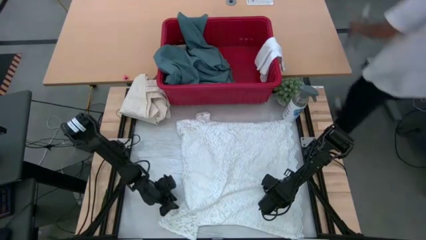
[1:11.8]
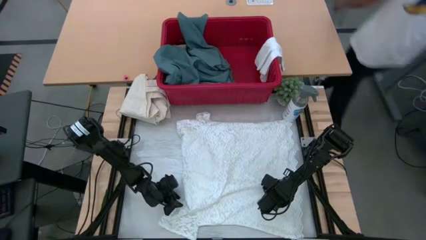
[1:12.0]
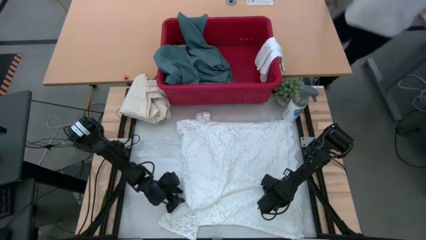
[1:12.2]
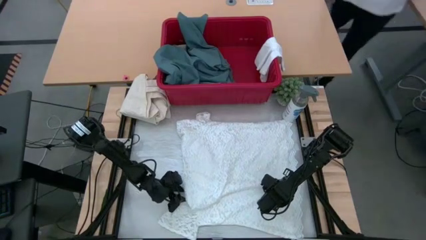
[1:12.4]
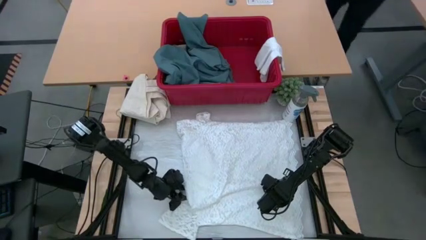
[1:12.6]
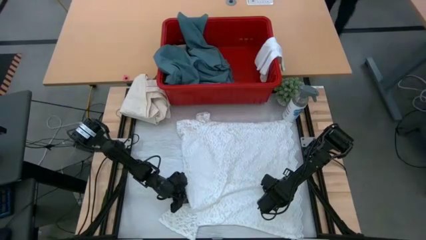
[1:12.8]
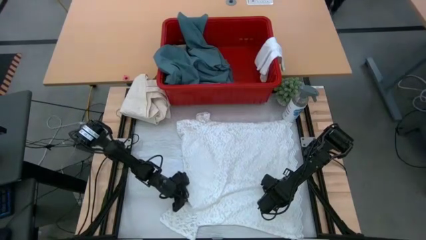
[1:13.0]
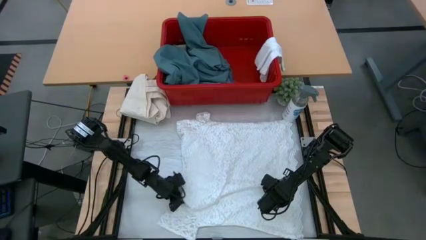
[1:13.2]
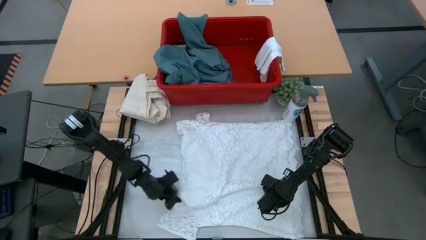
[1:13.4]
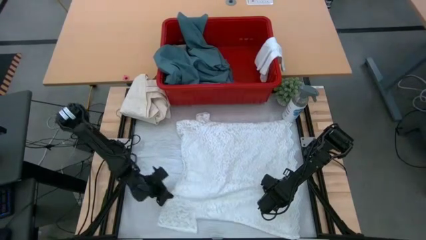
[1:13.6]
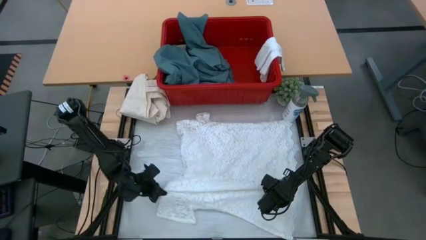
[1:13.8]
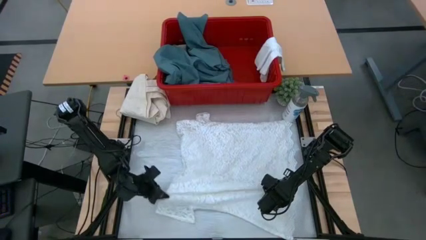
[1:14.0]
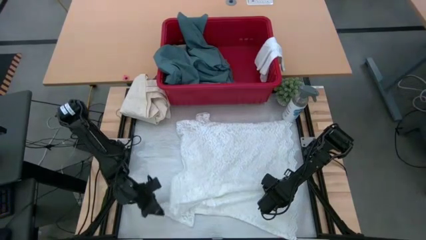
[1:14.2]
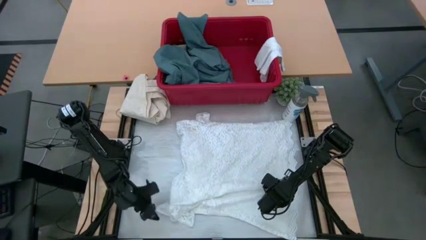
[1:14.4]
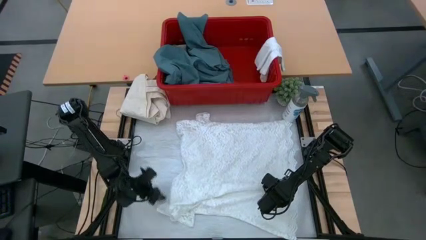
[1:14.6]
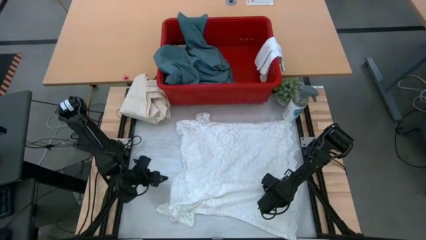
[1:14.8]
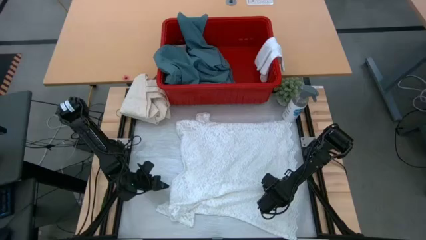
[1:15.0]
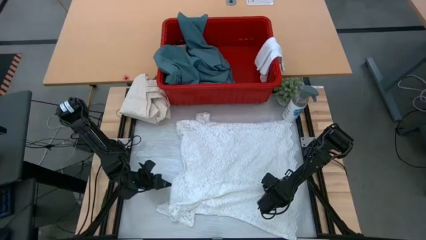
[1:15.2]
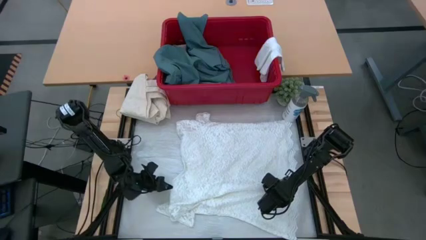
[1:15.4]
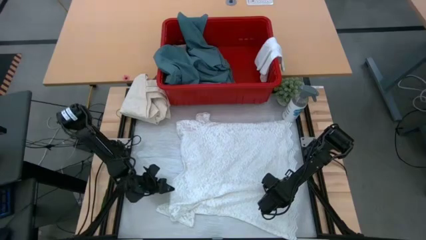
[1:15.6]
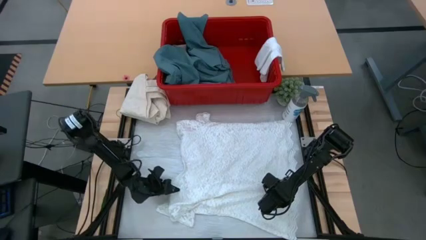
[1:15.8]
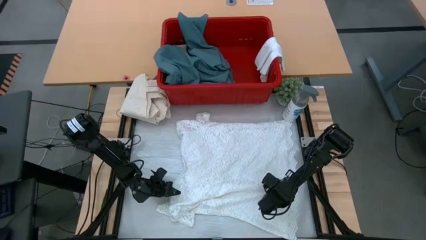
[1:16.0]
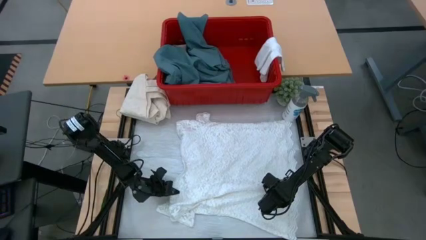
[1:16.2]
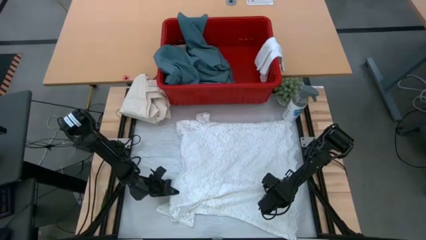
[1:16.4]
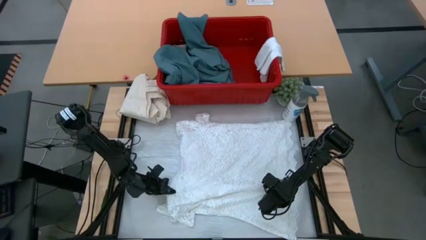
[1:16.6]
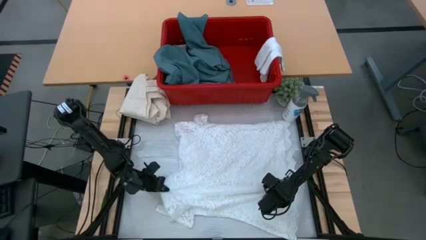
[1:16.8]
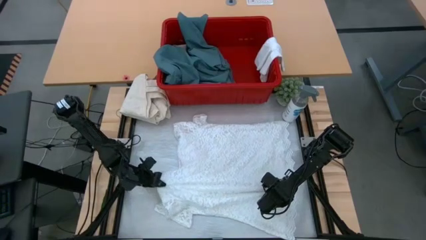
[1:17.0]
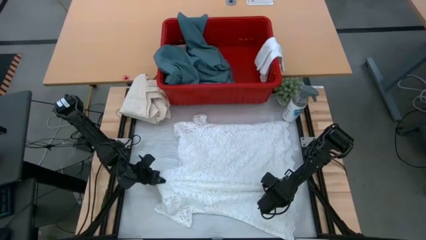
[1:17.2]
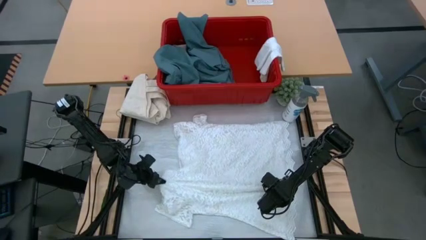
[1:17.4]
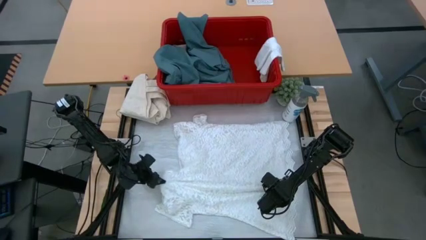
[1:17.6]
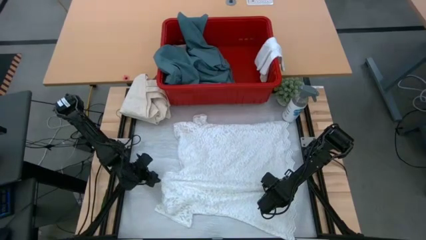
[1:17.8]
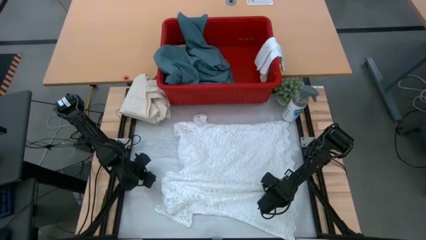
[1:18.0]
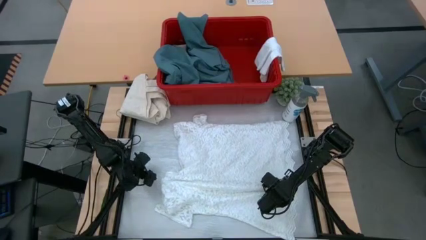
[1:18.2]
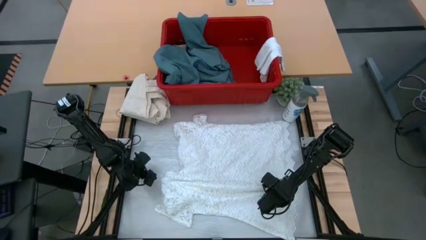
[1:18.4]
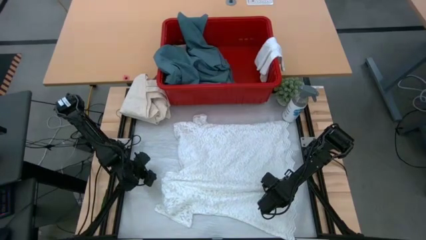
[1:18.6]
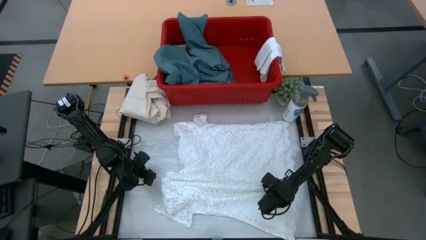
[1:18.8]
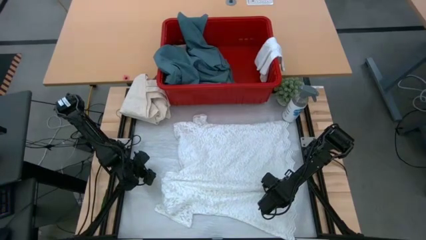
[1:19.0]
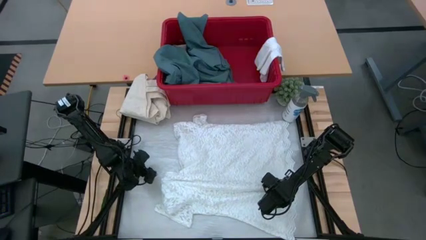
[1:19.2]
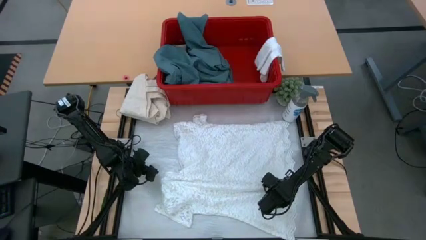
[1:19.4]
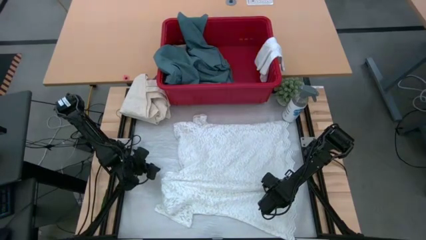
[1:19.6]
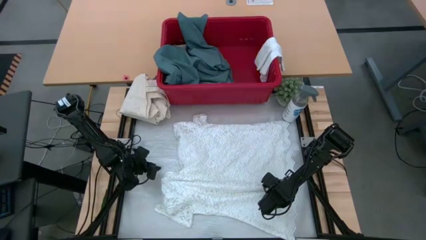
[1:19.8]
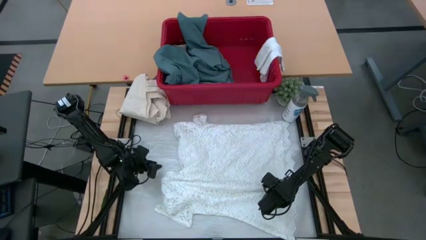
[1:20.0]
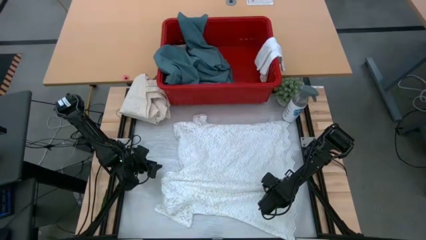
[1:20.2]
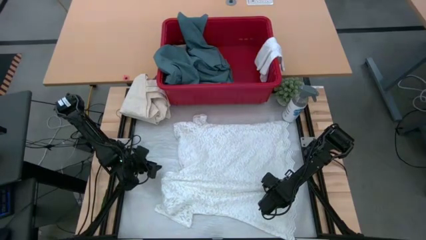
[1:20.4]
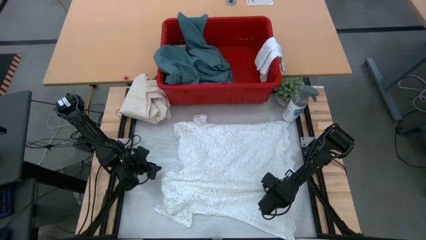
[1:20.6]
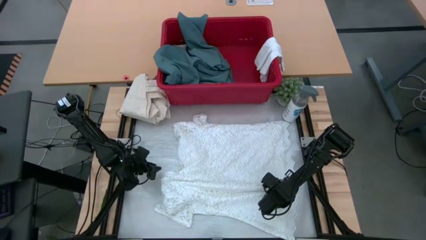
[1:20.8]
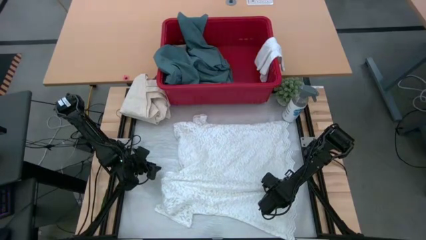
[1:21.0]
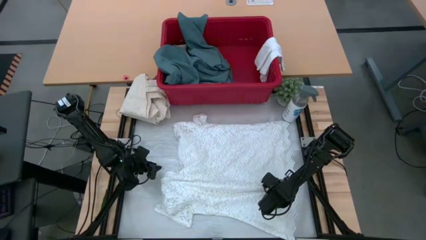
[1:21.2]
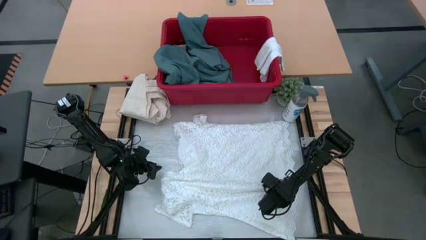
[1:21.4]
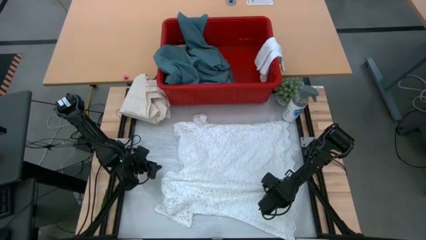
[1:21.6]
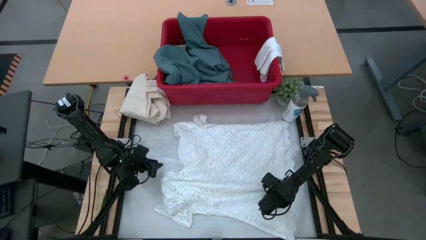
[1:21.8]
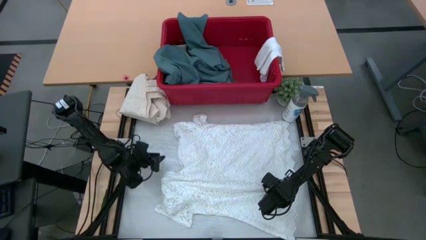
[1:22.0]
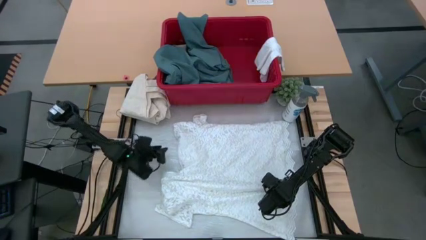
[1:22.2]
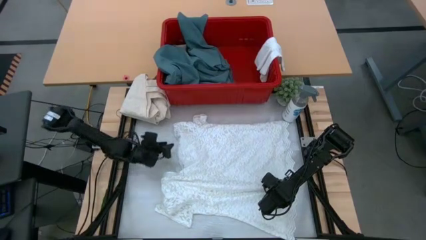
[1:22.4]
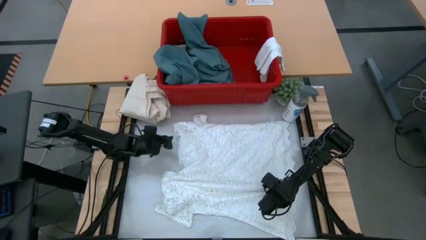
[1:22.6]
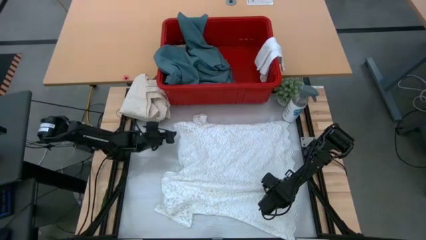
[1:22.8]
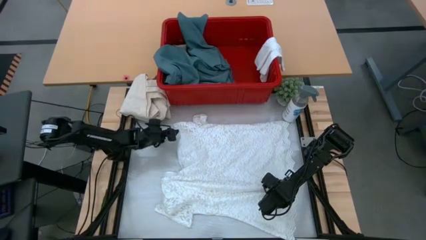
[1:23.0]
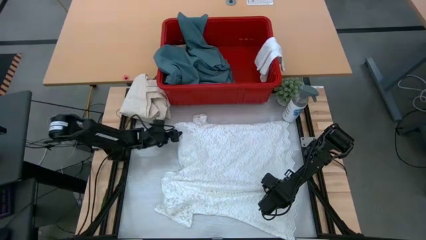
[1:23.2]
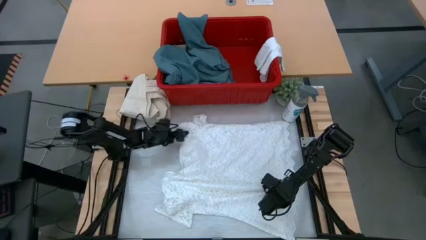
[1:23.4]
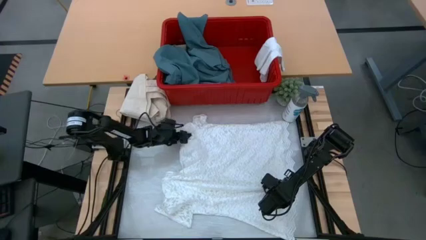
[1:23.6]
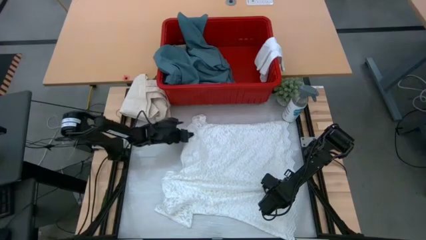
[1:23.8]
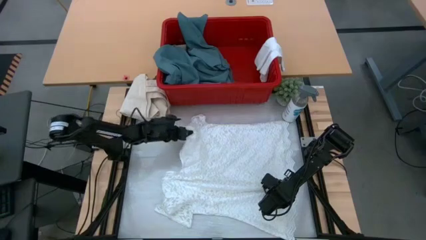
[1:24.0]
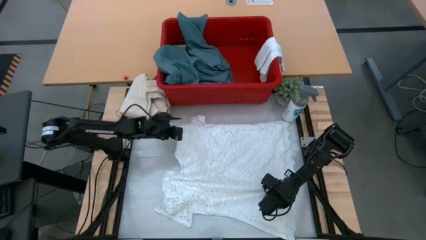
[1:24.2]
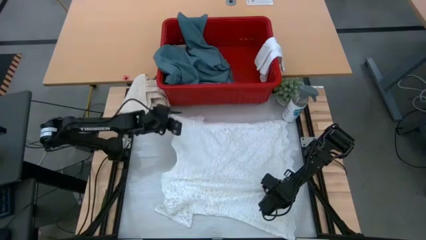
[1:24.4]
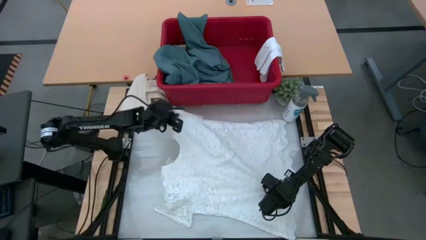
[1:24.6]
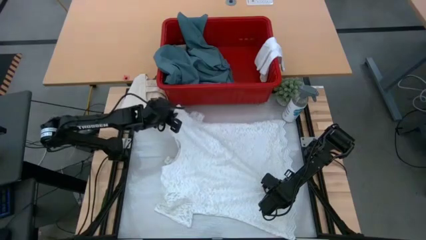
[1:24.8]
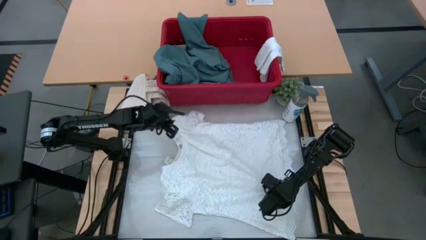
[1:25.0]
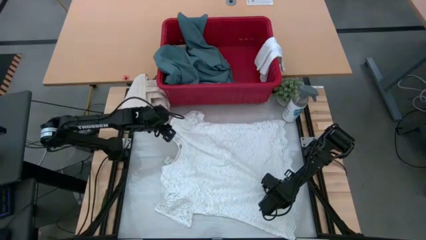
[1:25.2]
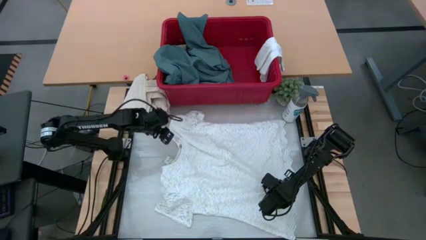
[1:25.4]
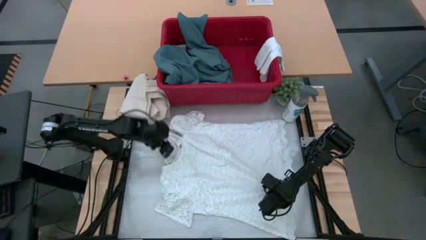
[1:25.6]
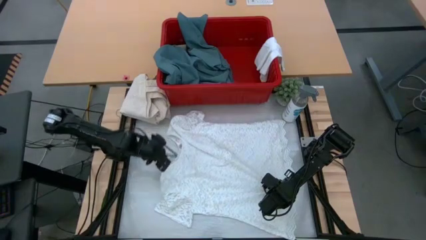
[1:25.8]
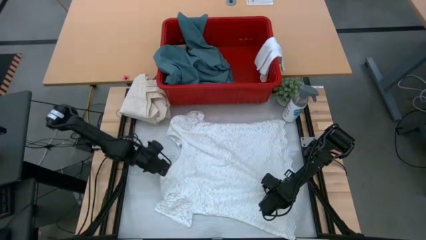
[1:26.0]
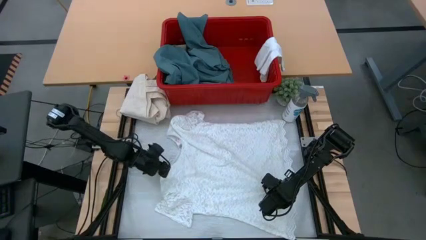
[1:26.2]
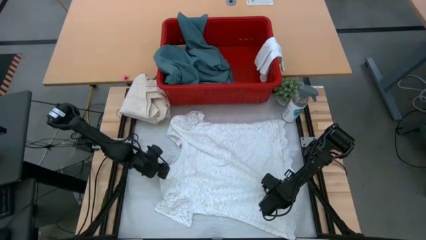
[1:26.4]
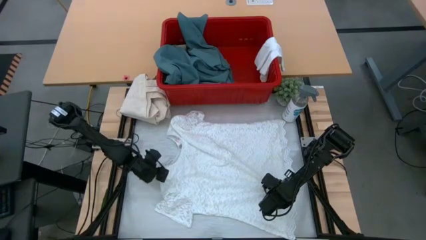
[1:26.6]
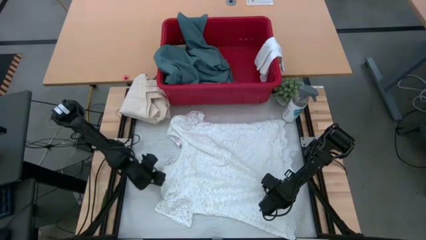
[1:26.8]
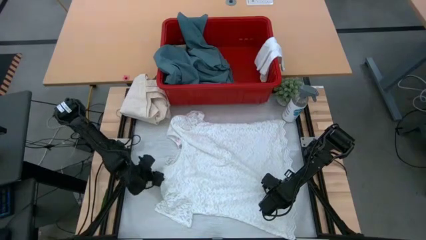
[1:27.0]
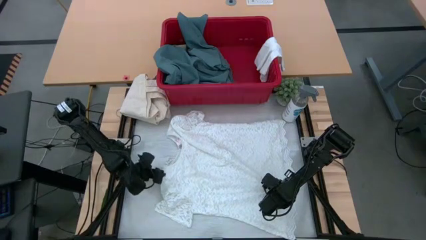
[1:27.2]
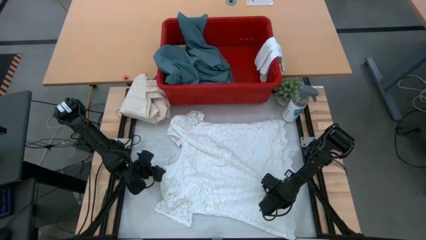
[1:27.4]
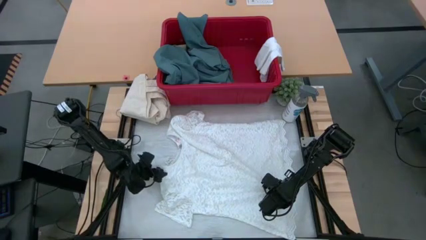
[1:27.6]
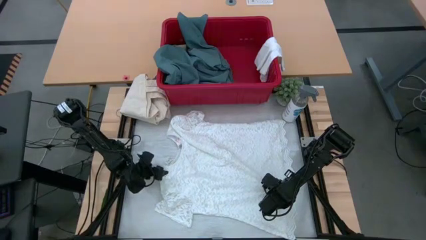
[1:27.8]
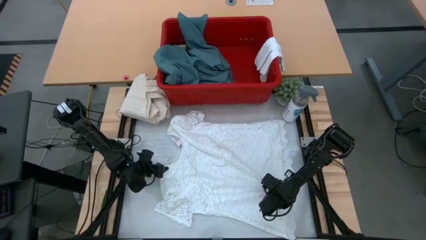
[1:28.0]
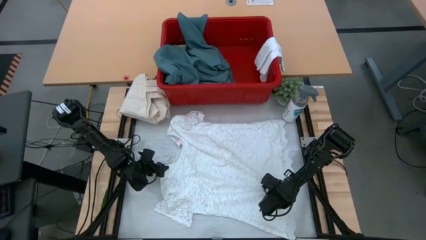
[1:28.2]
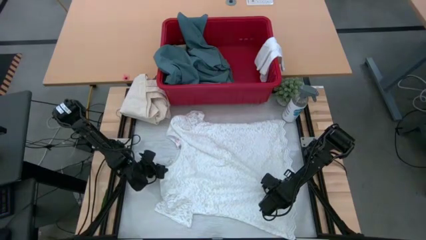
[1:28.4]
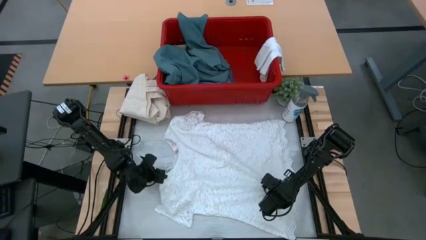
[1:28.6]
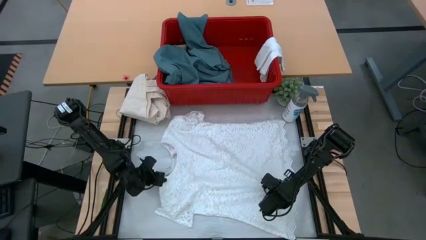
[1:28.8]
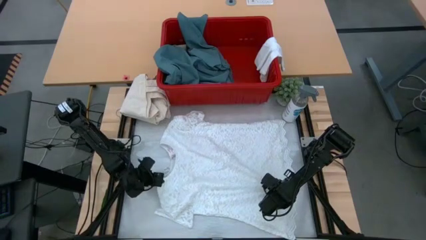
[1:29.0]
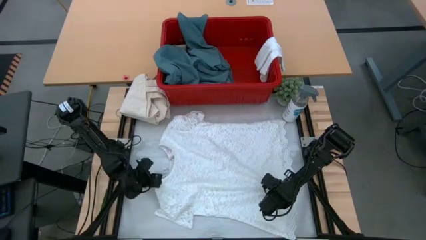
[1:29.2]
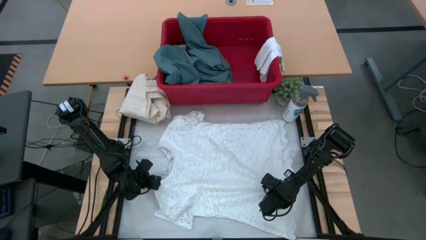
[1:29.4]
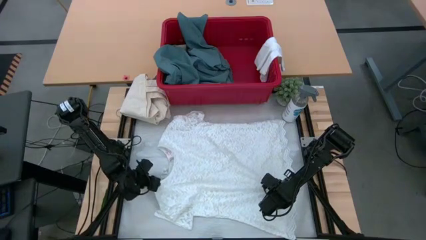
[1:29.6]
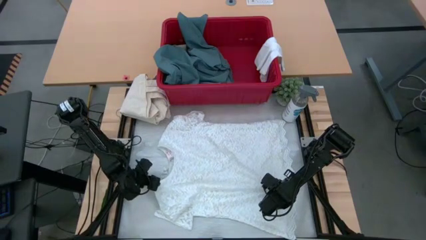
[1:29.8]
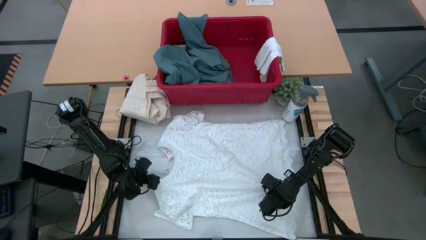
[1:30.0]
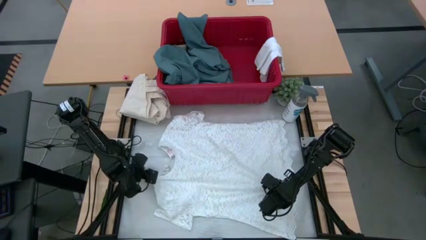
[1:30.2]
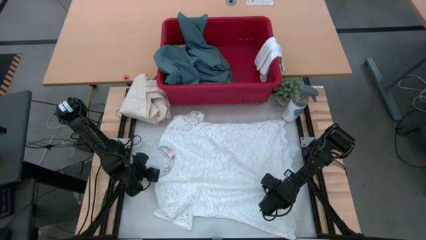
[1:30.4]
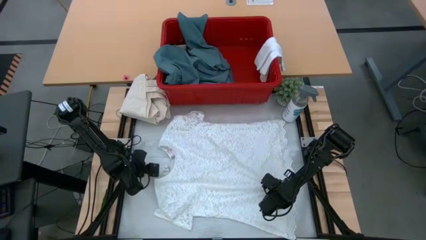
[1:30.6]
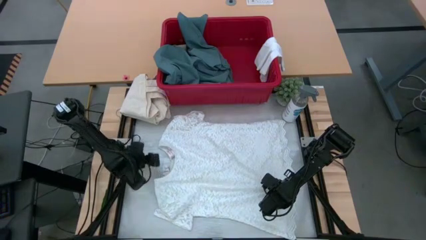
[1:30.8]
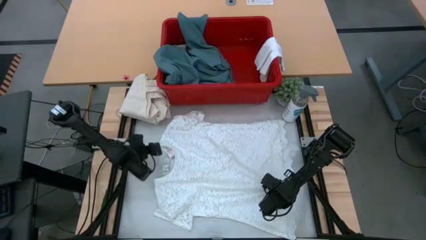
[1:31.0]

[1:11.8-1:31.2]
Task: Fold Laundry from Bin
Fold the white shirt
